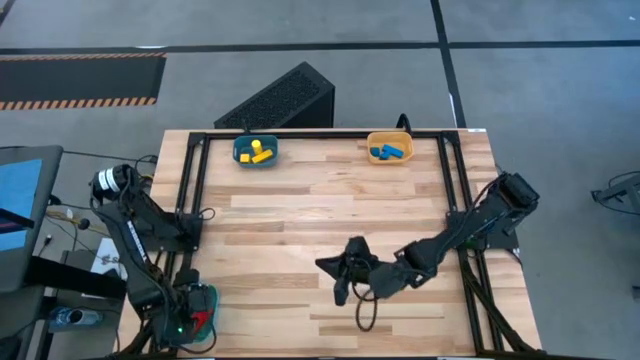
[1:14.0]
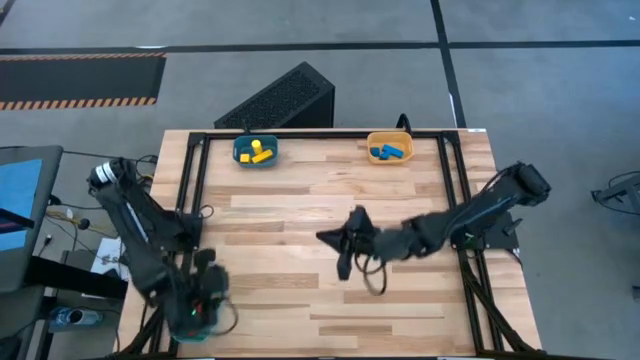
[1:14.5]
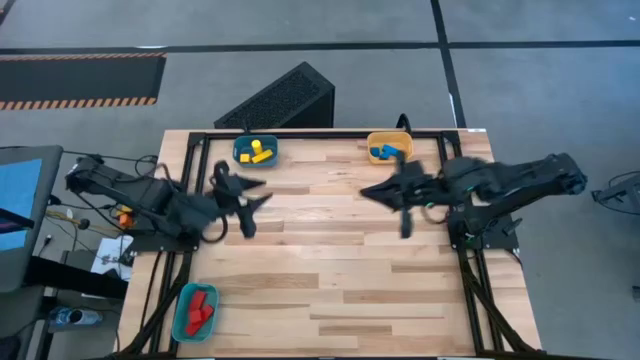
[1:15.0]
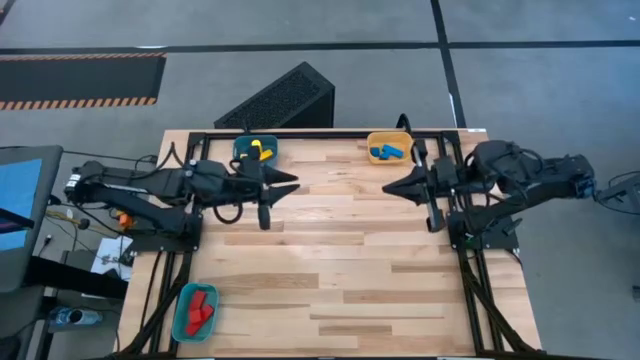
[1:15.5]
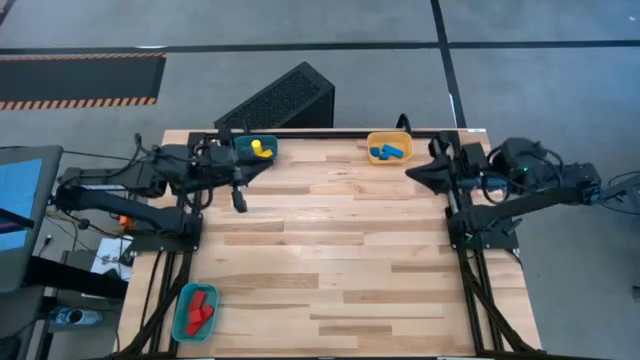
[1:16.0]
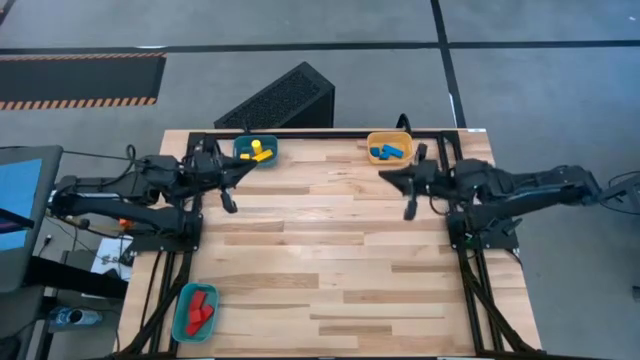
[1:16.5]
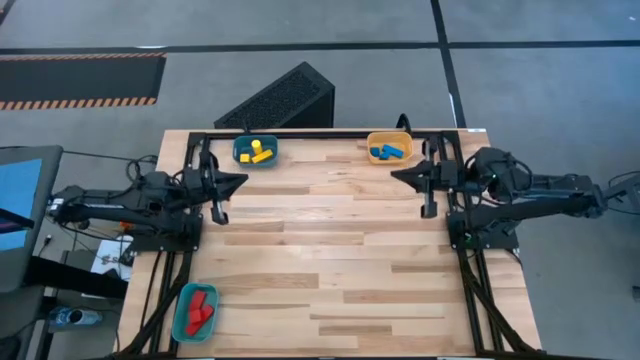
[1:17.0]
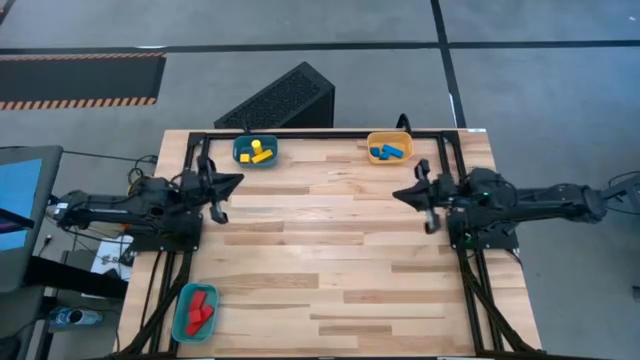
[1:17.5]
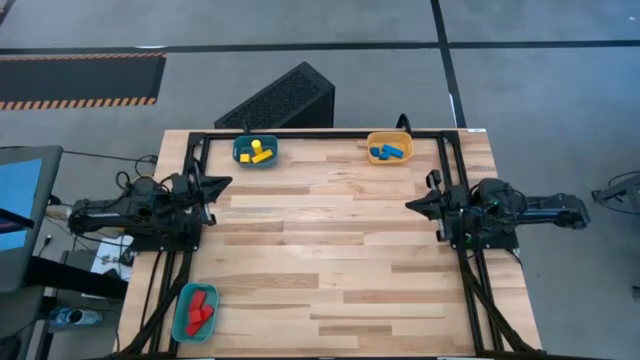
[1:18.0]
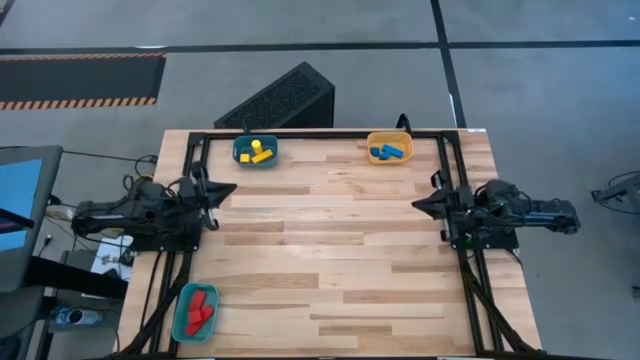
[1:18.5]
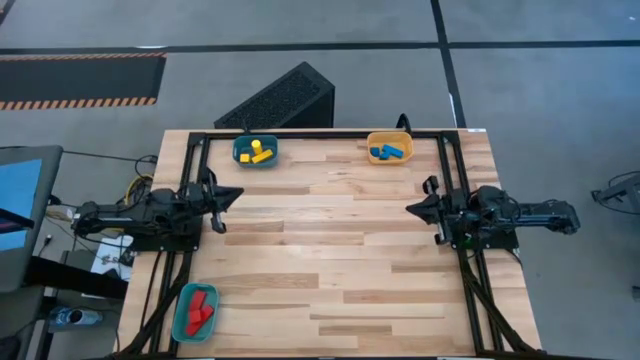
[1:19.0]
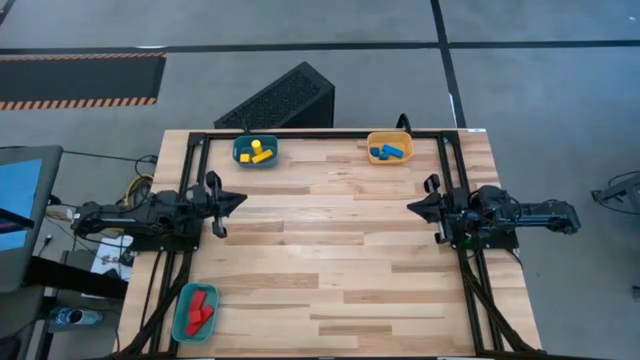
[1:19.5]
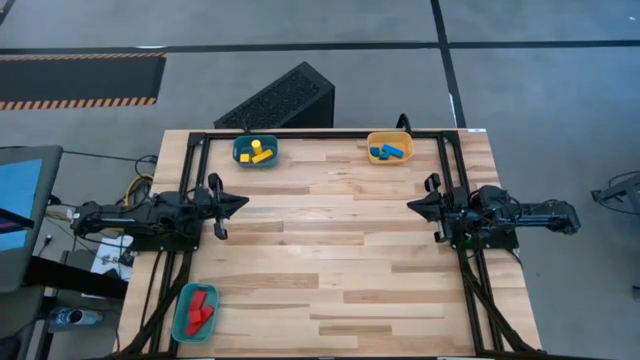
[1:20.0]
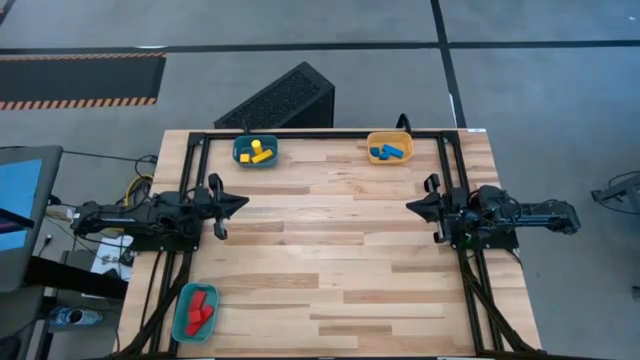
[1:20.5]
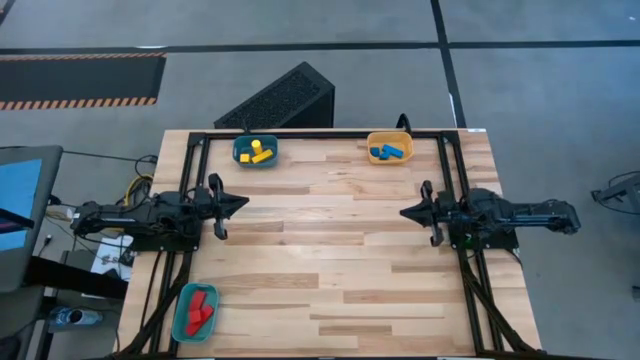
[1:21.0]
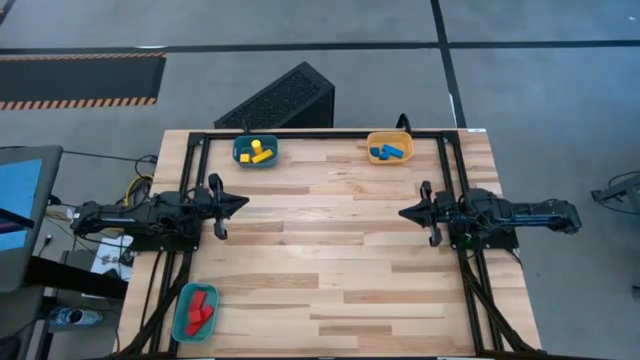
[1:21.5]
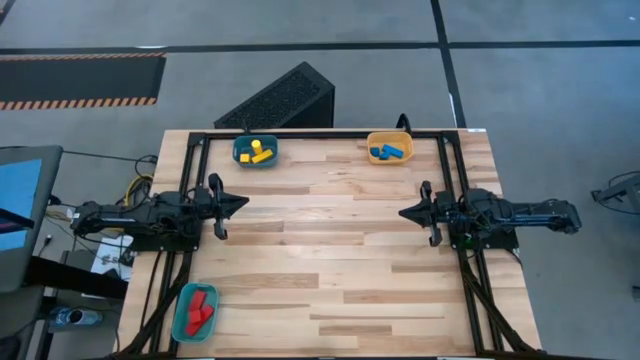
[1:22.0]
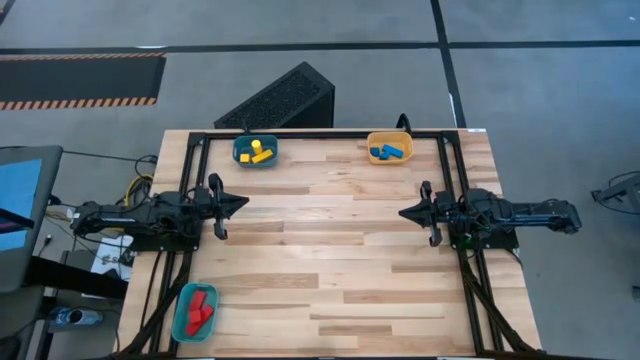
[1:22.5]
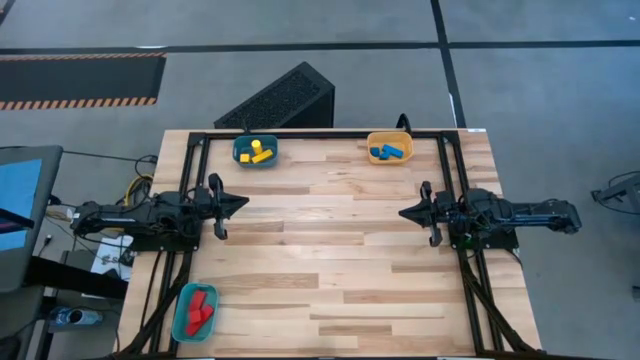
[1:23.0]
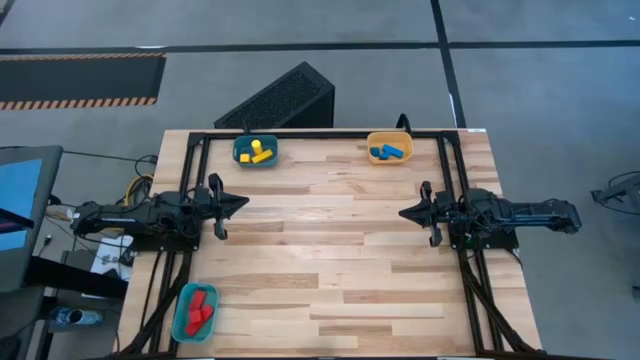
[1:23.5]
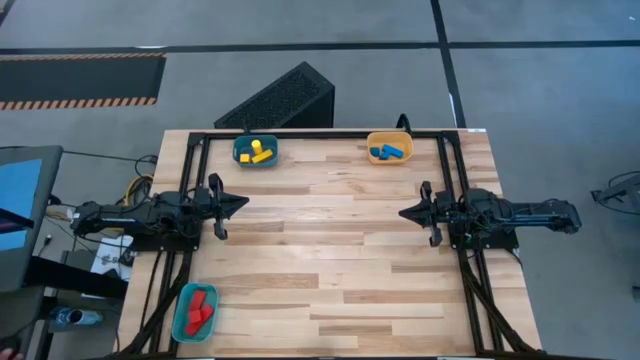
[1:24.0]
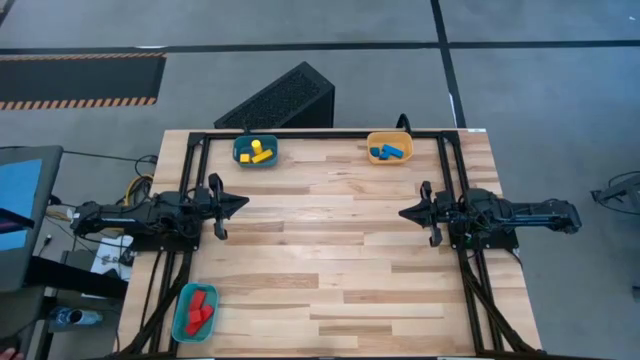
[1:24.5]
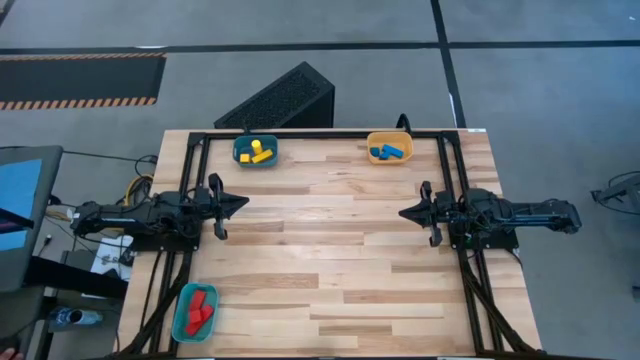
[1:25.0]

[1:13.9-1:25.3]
Task: Sort & place blocks by color
Return to Home Position

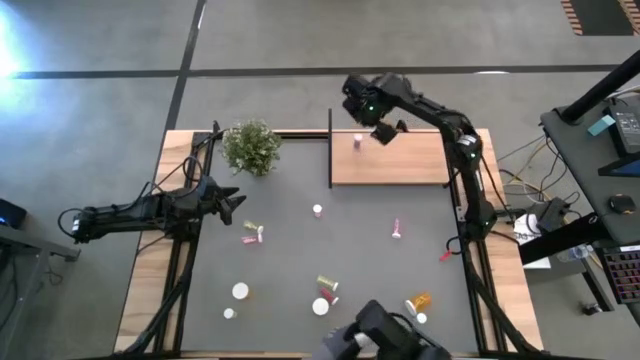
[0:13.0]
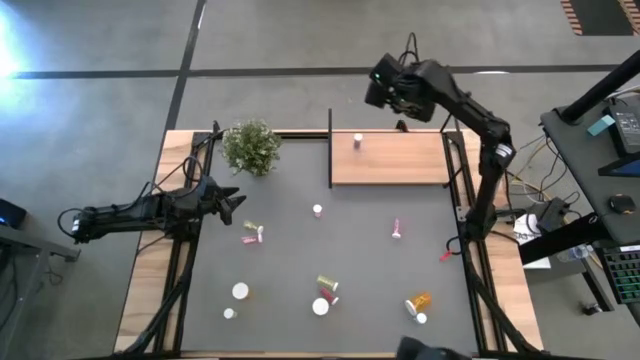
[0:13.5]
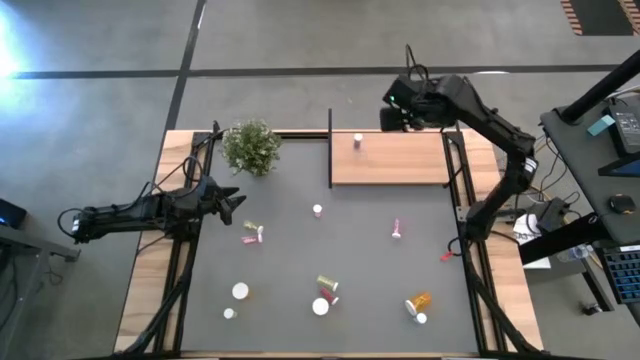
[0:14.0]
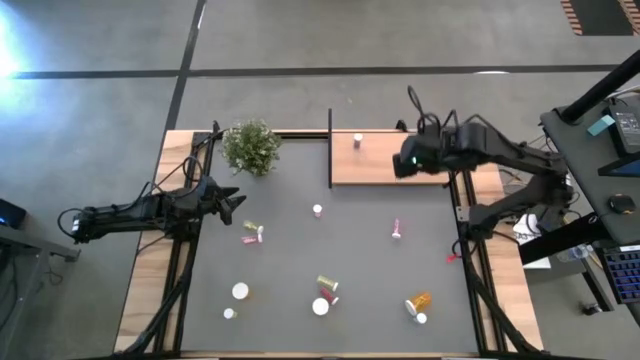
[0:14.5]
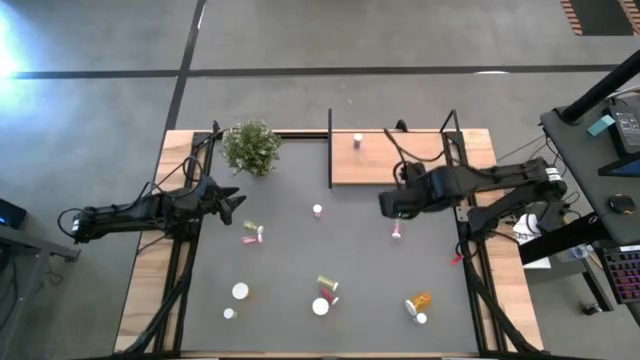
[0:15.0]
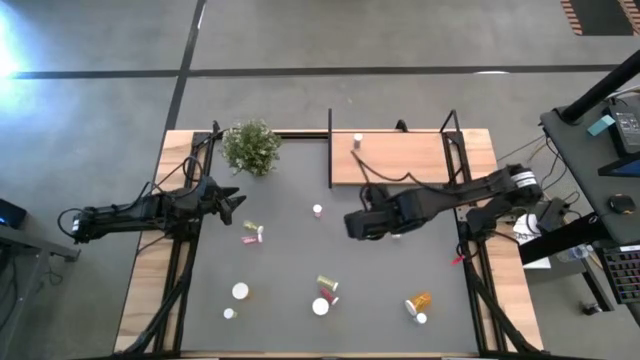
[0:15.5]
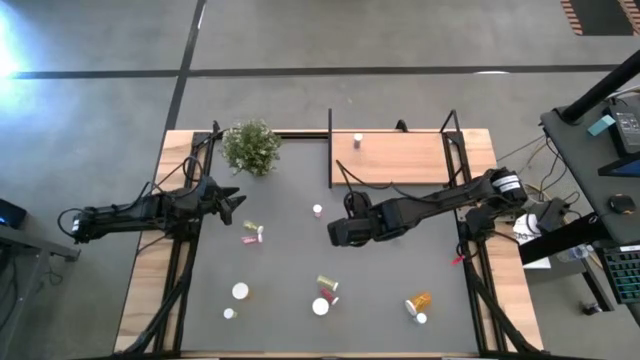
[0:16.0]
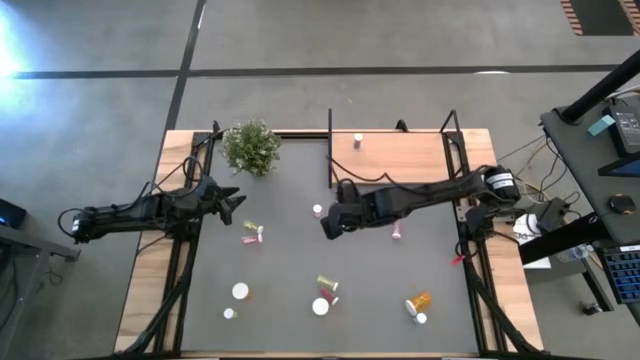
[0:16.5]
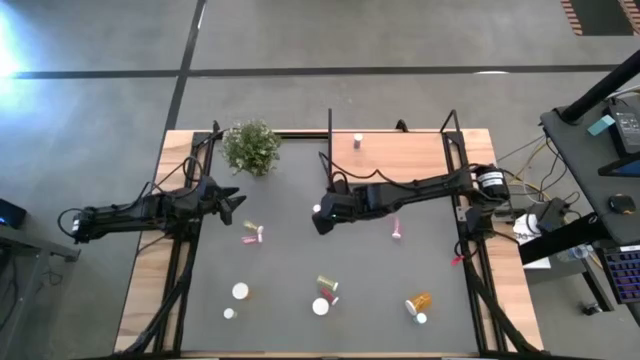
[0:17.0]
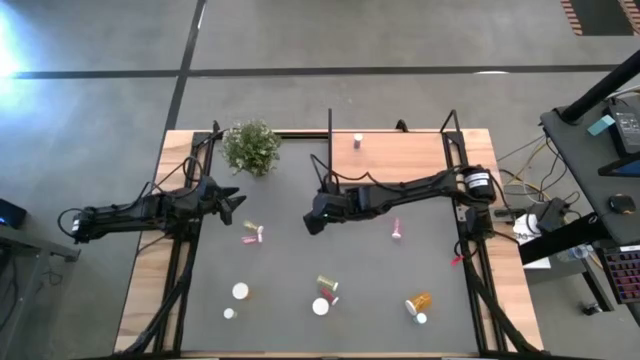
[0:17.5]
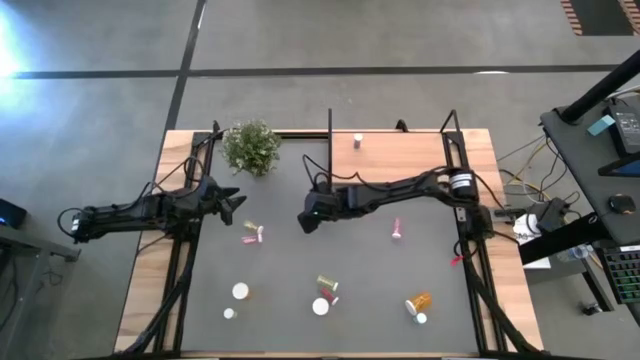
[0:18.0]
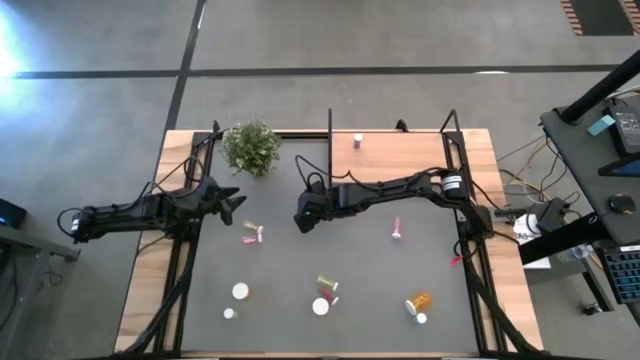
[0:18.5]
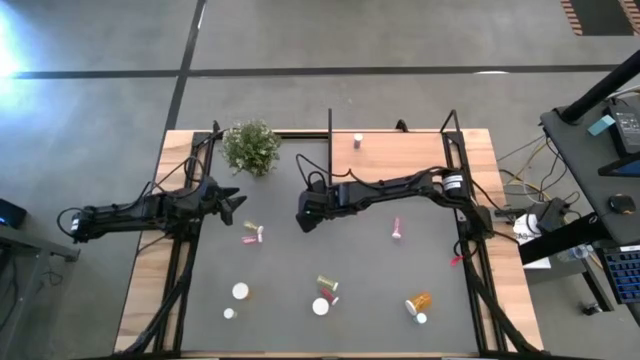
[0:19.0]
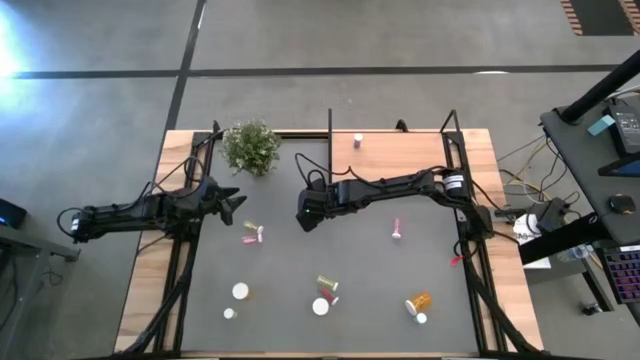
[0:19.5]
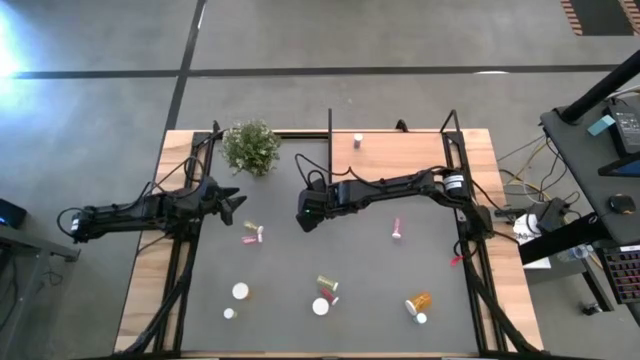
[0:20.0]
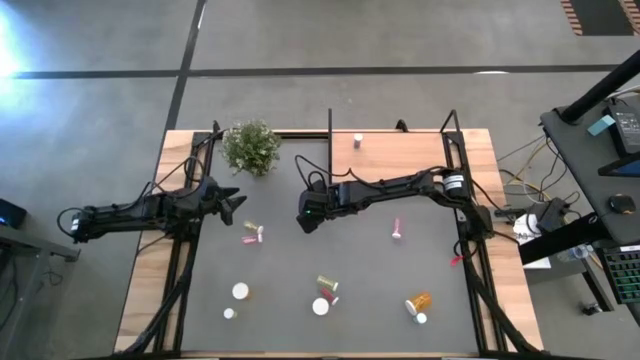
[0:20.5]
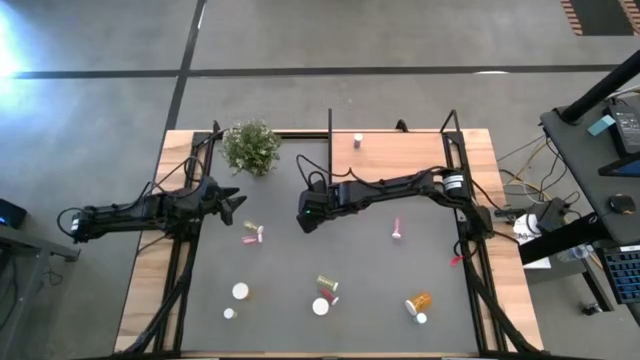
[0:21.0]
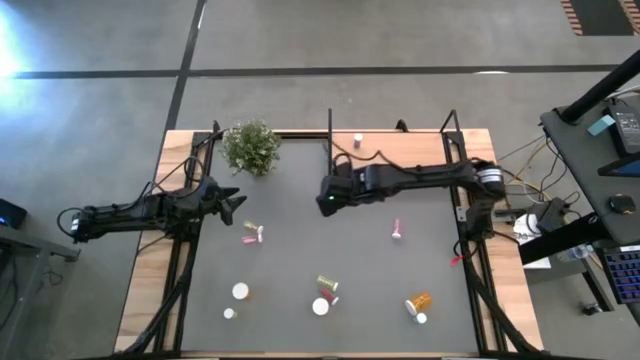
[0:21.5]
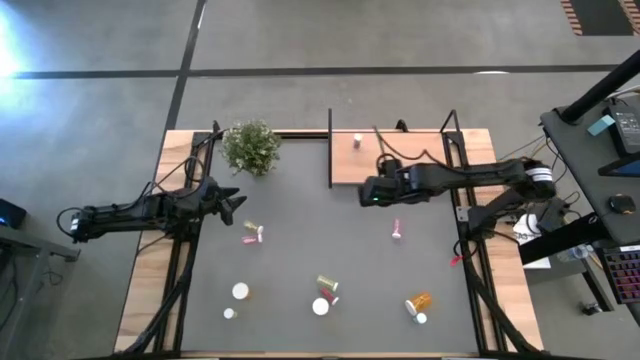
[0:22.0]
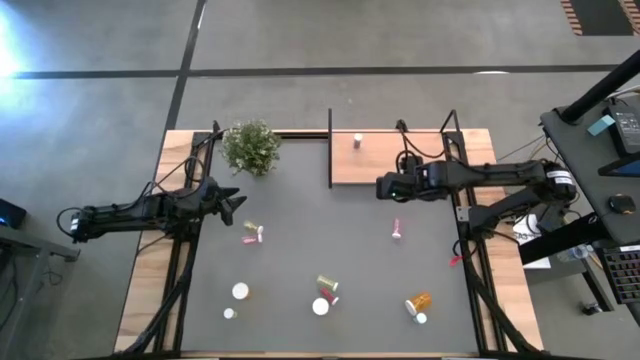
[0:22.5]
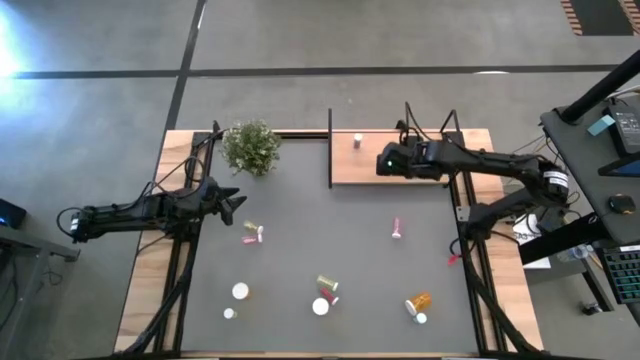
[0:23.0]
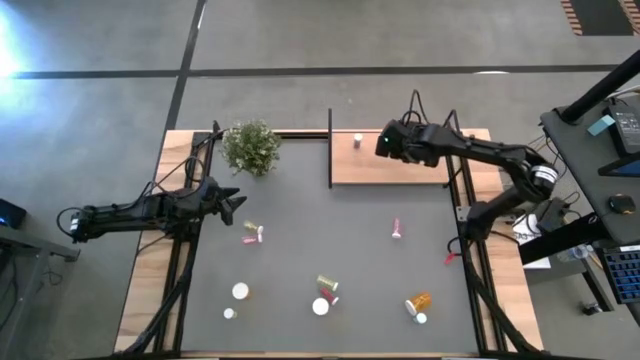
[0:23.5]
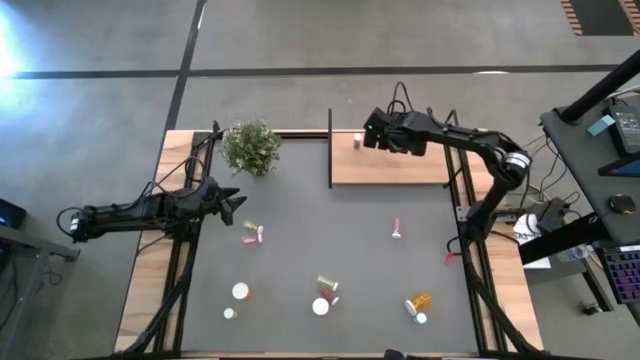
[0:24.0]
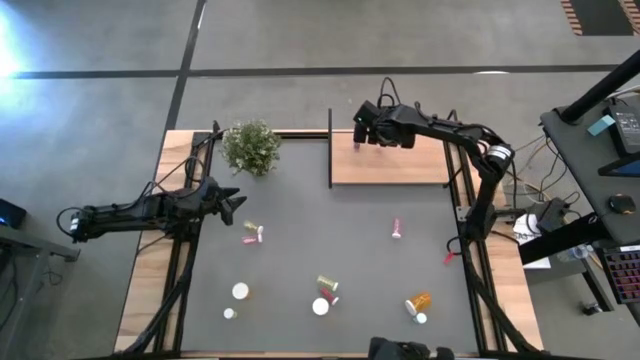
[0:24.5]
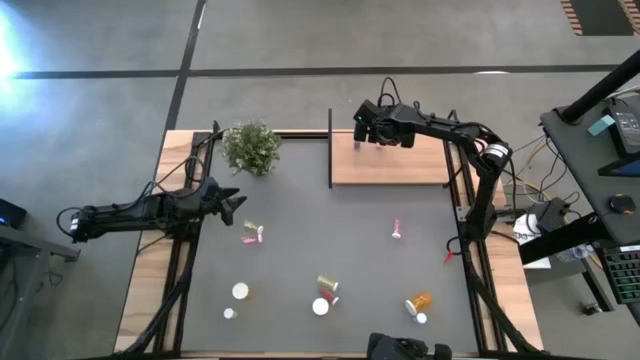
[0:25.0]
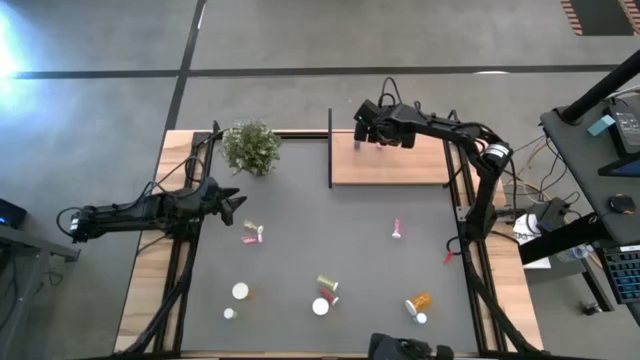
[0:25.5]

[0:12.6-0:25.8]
Task: Pick and place medicine bottles onto shelf by color
Put the middle pink pill bottle on the shelf
